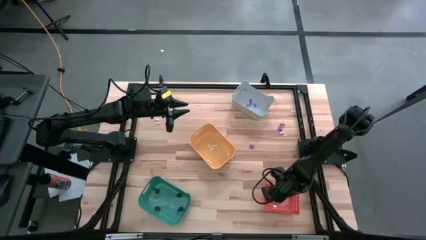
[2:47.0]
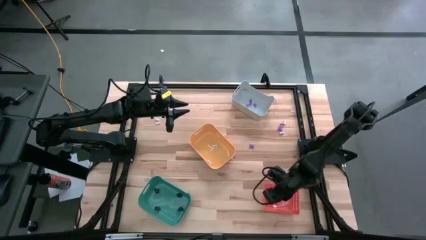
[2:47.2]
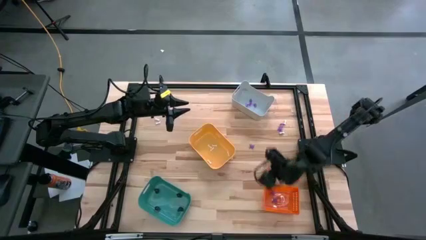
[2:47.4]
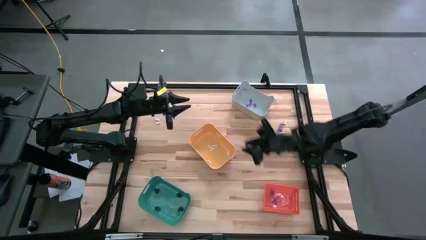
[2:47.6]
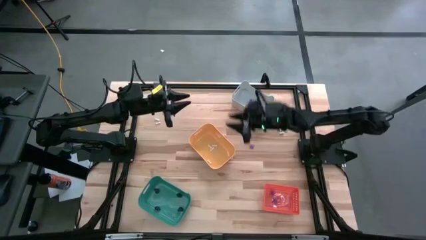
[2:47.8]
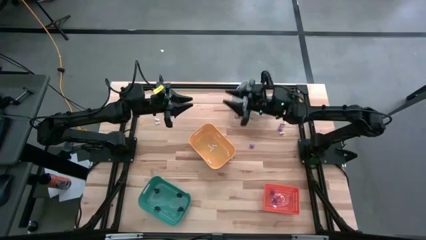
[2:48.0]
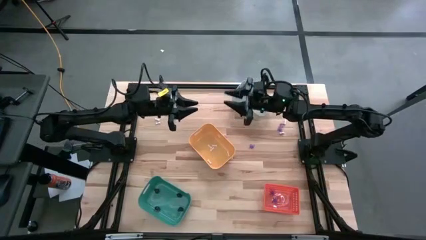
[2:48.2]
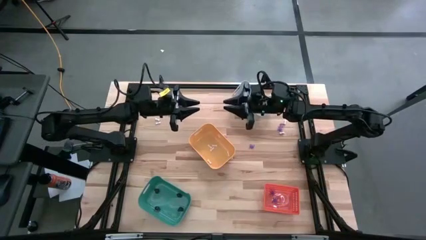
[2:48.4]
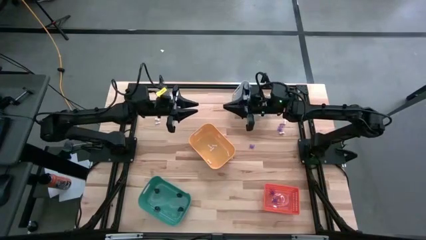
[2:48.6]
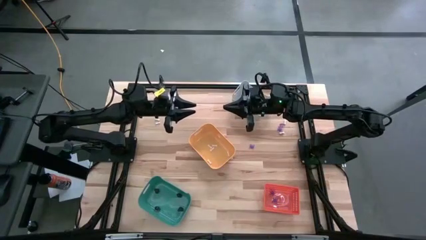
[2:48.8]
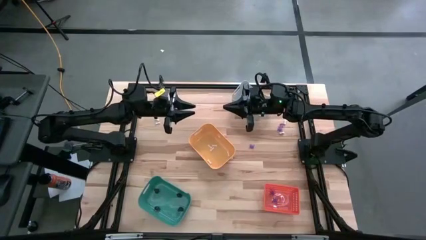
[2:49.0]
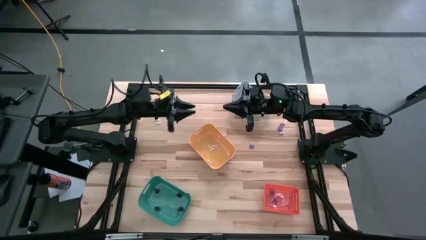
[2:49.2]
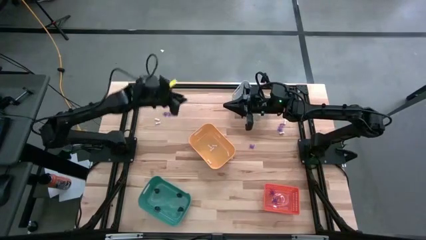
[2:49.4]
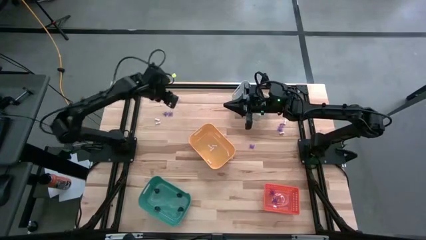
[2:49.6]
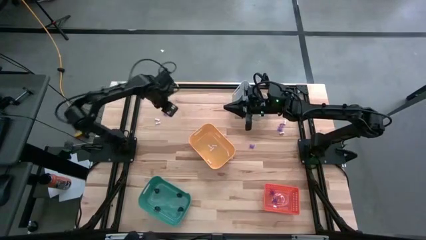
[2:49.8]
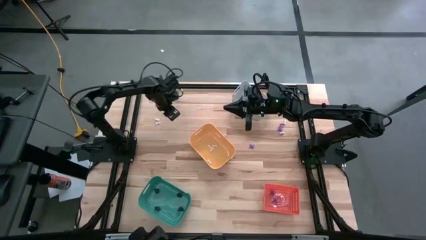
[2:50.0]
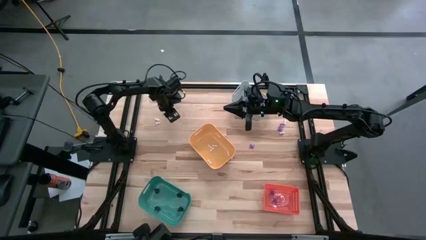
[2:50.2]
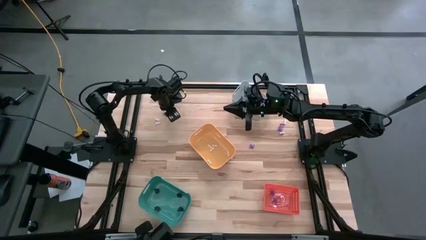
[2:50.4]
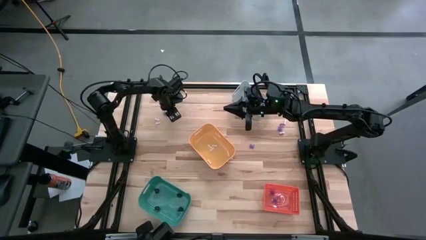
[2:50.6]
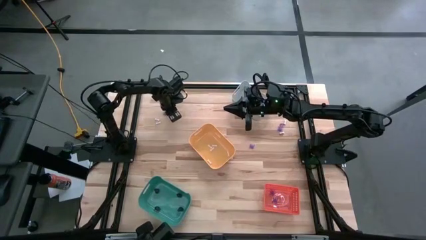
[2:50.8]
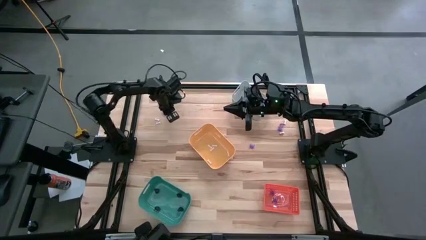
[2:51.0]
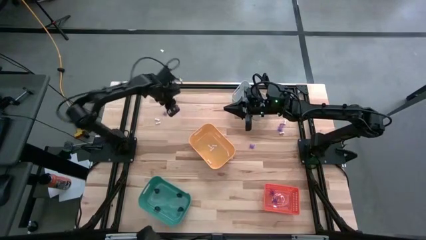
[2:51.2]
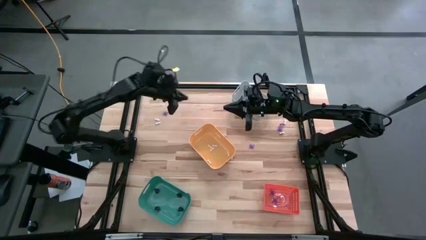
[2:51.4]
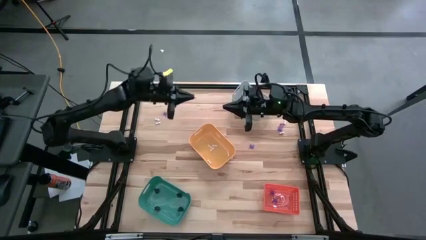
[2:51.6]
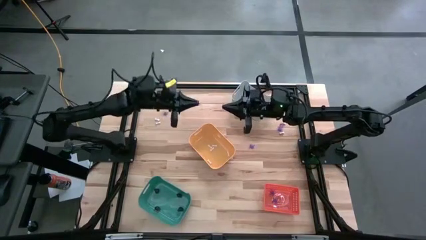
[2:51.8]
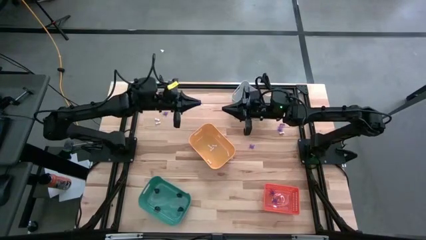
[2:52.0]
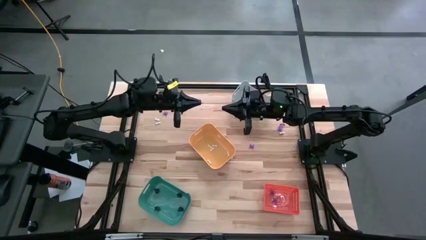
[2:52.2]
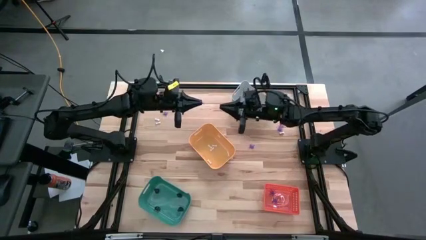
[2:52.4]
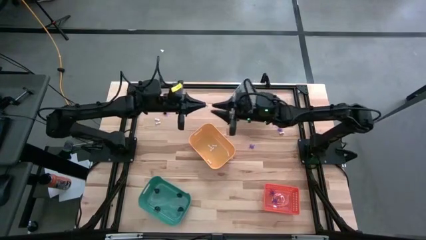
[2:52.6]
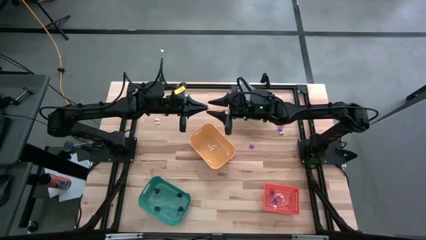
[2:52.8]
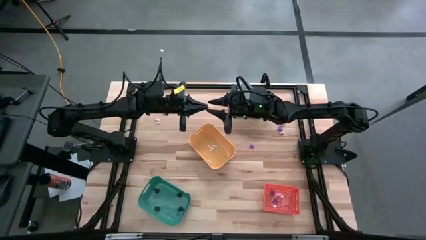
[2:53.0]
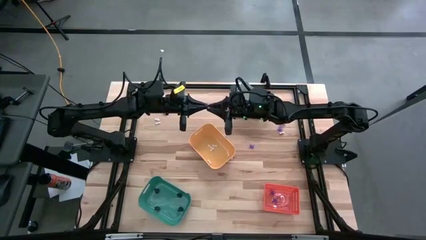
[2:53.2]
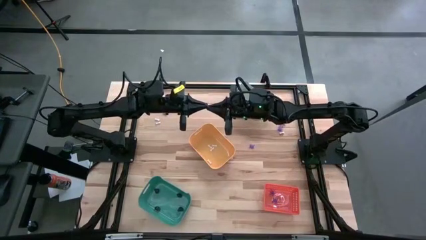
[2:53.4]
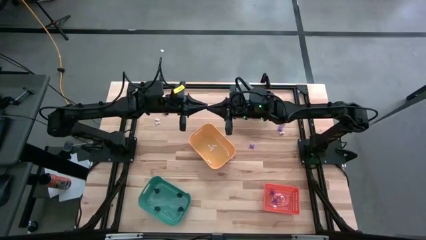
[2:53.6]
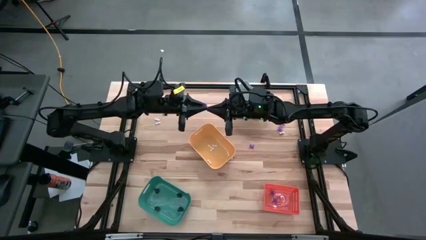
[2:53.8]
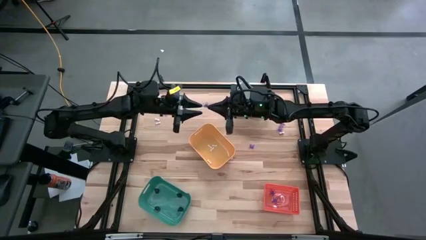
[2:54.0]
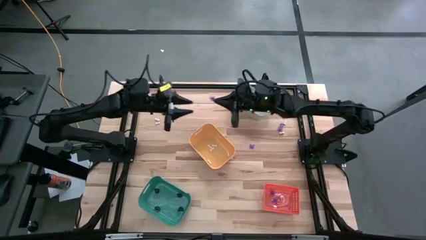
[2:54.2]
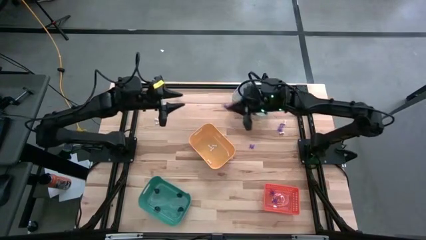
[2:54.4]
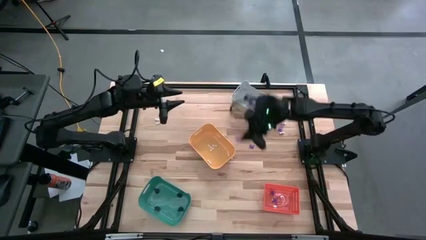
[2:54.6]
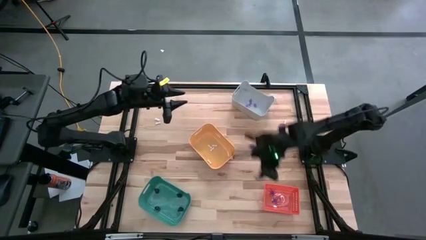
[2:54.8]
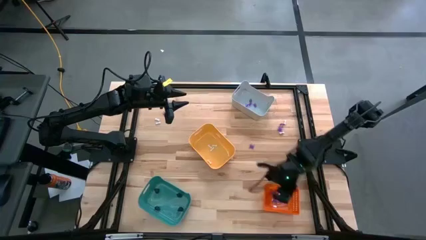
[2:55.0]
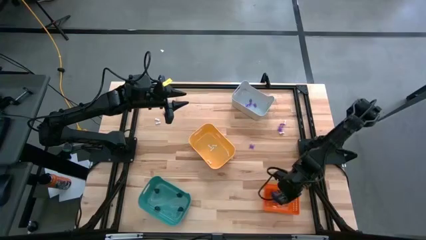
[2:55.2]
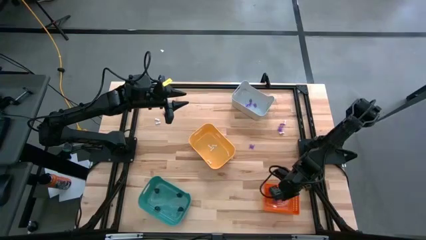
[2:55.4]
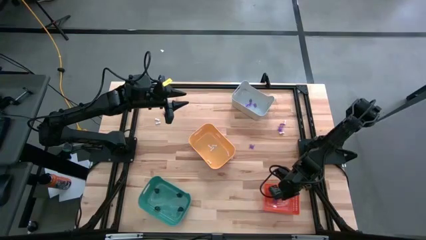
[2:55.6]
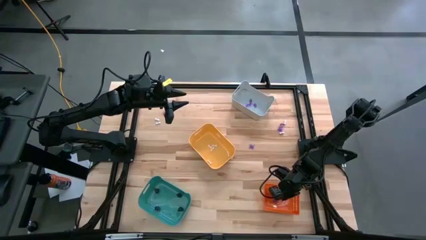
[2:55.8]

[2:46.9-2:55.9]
Task: Sort Halloween decoration
Put the purple spider toy into the orange bin

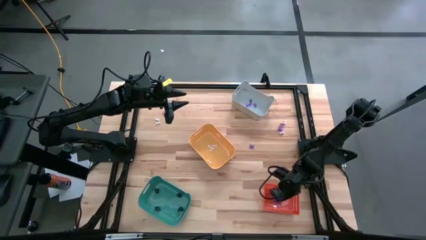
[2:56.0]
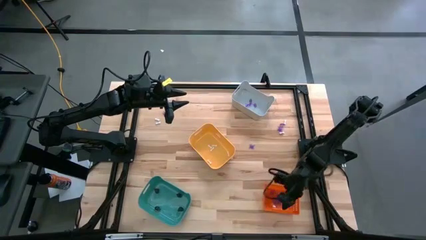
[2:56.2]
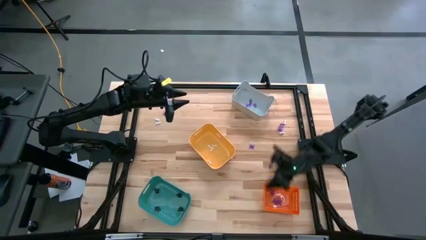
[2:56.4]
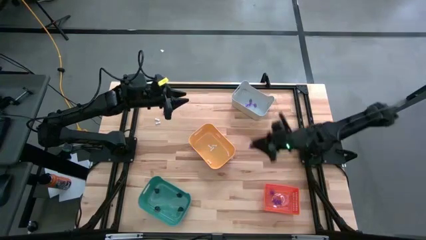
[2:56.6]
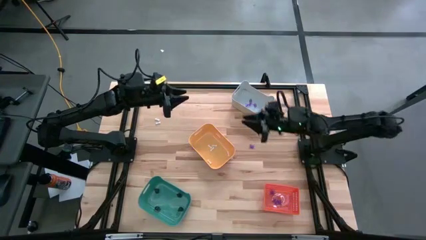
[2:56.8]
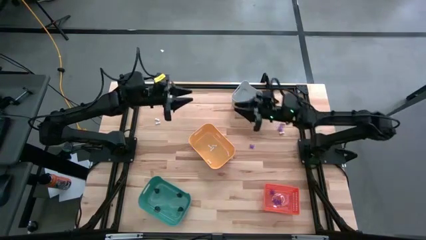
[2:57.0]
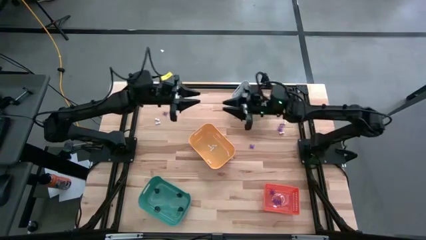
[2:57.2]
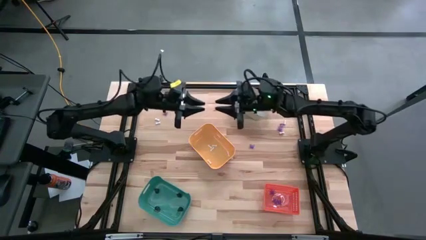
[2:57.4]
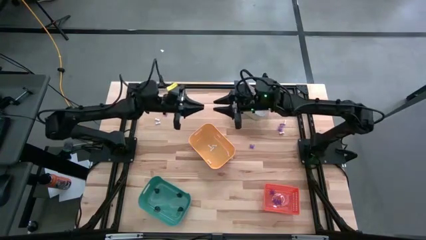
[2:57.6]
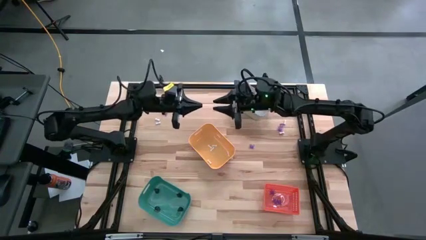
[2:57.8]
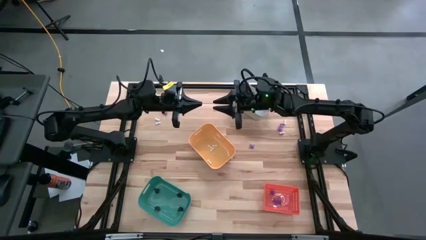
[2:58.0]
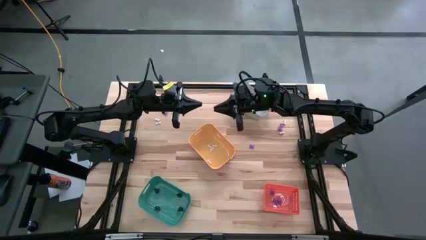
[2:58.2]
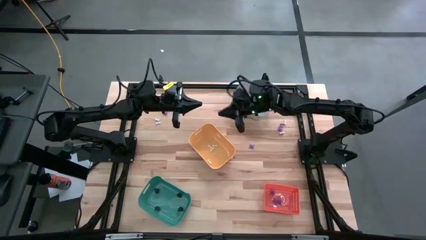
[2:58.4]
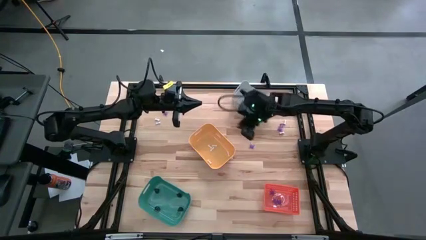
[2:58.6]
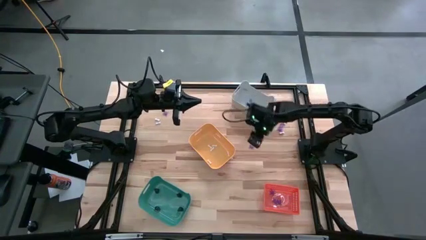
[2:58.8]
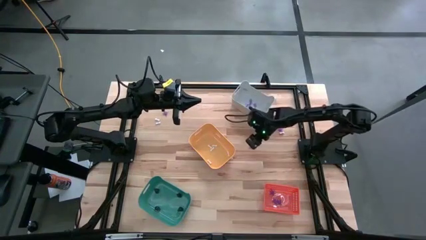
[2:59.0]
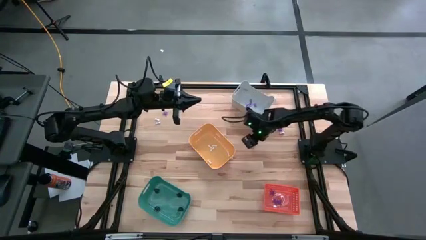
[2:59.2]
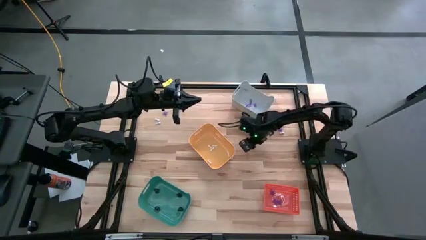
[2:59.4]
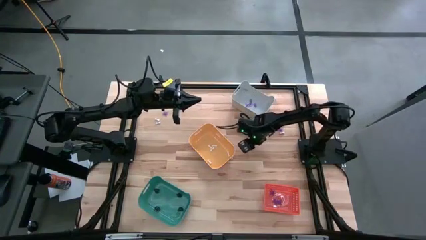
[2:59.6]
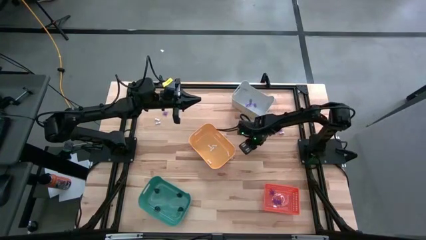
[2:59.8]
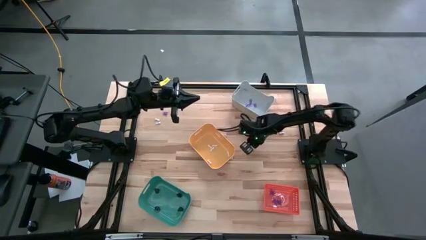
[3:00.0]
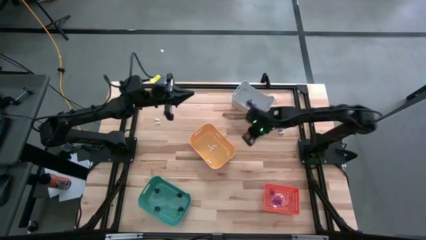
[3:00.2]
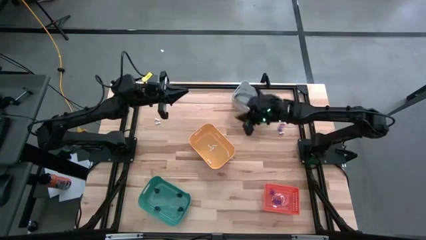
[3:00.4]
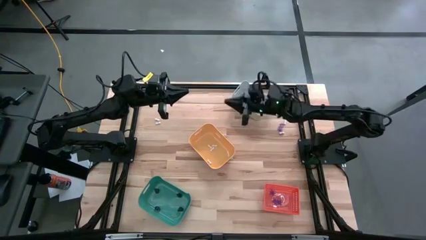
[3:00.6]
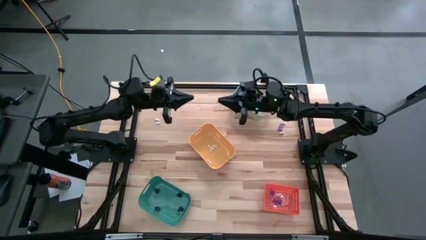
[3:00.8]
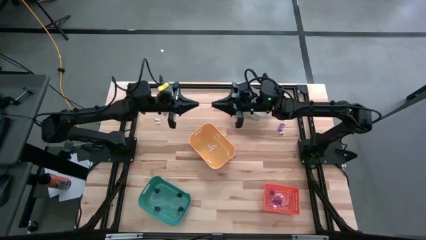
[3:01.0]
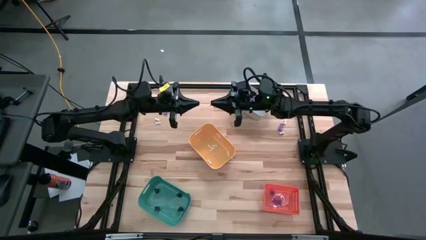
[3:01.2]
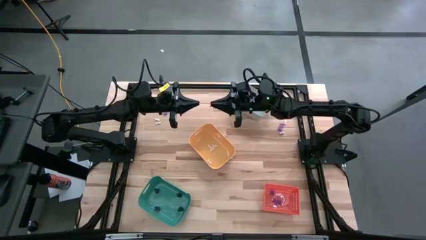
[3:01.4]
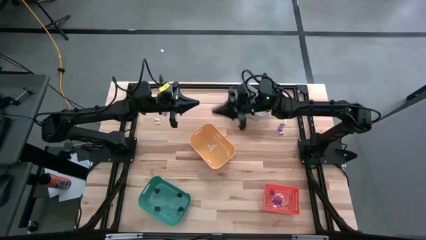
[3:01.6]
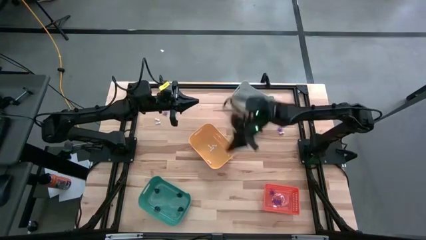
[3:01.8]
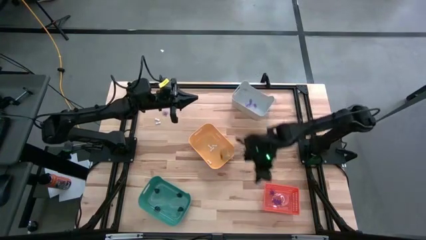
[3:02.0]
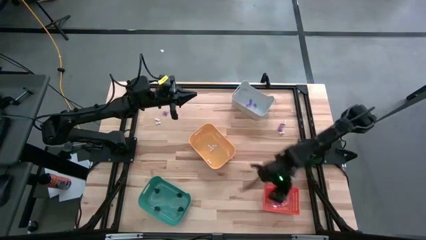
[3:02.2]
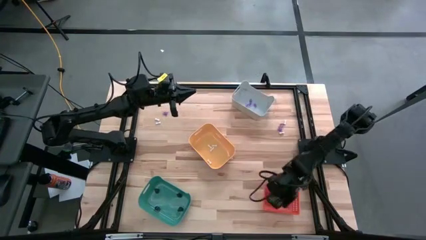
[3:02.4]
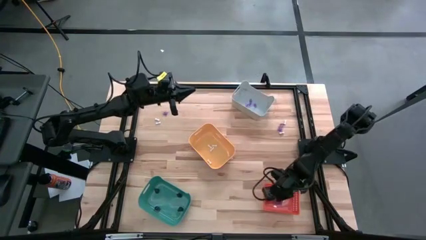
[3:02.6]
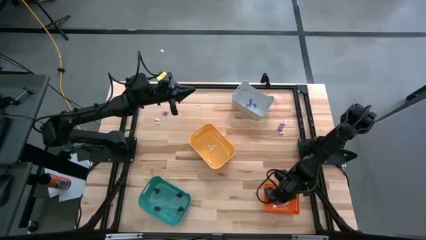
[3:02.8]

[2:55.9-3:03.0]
Put the purple spider toy into the orange bin
